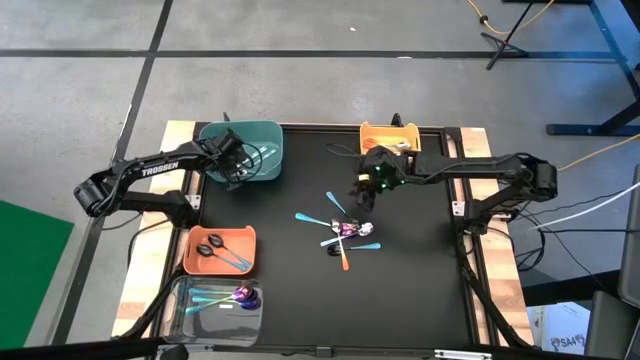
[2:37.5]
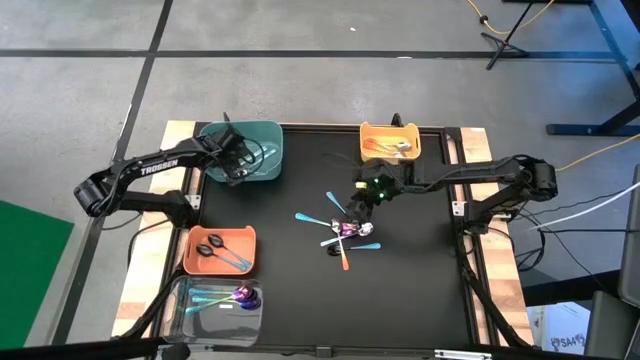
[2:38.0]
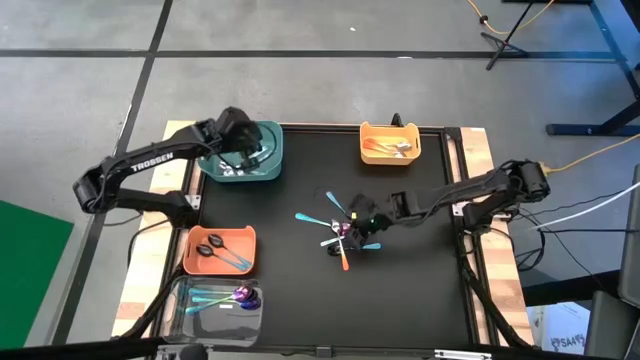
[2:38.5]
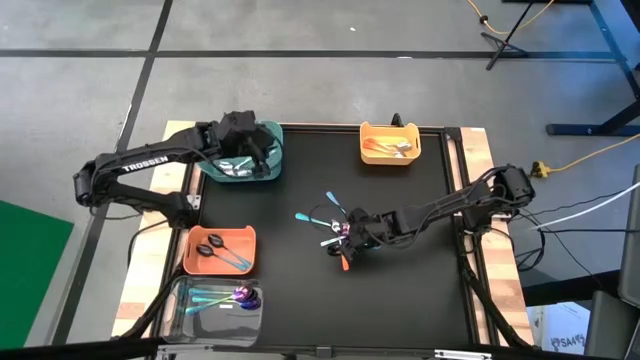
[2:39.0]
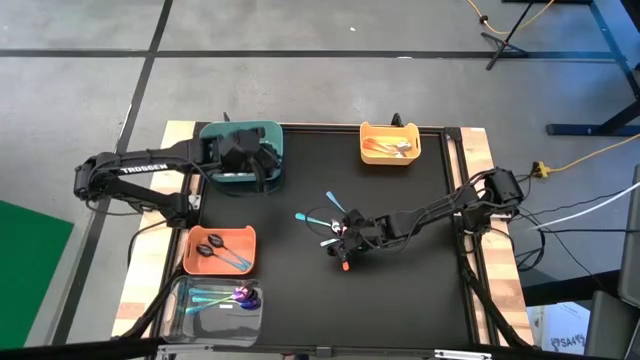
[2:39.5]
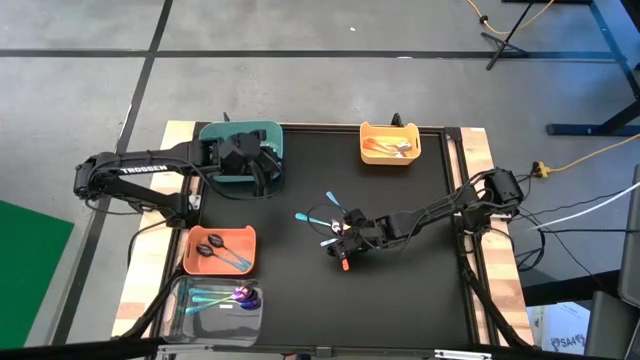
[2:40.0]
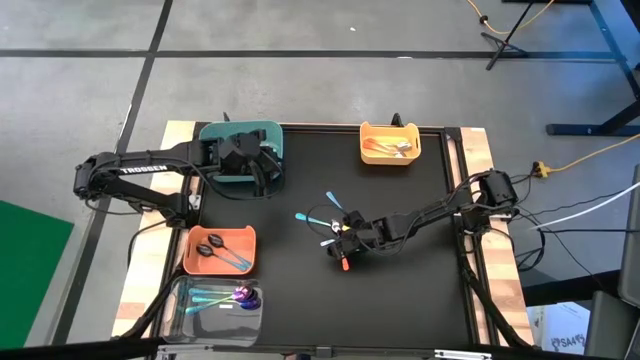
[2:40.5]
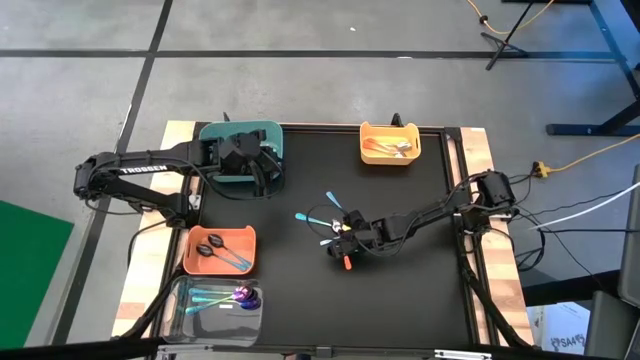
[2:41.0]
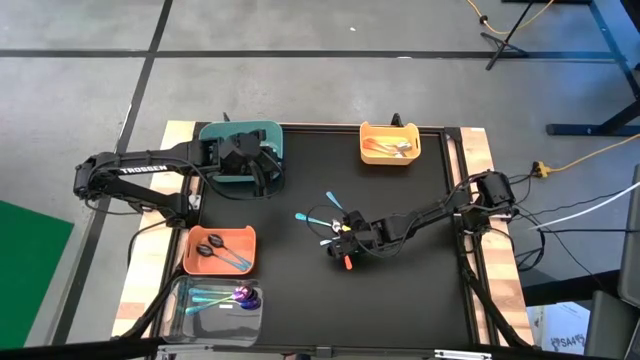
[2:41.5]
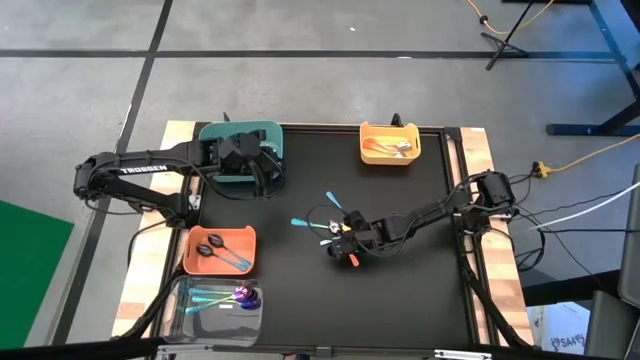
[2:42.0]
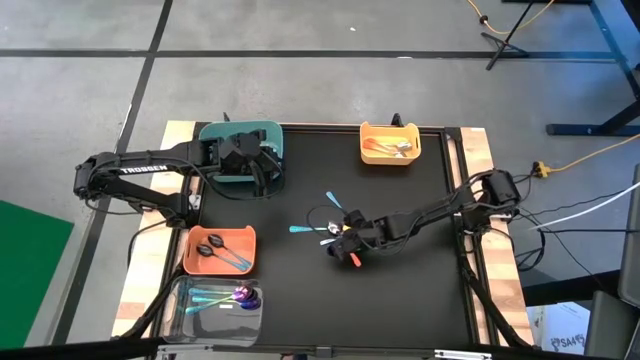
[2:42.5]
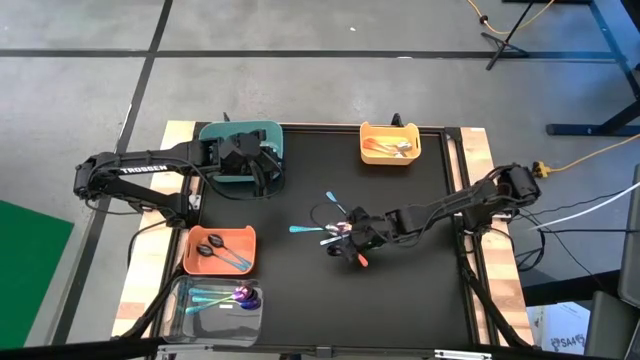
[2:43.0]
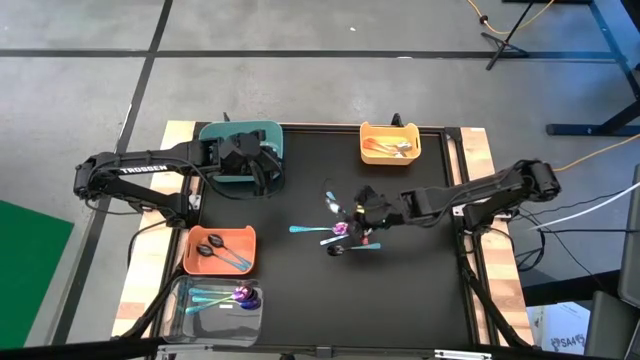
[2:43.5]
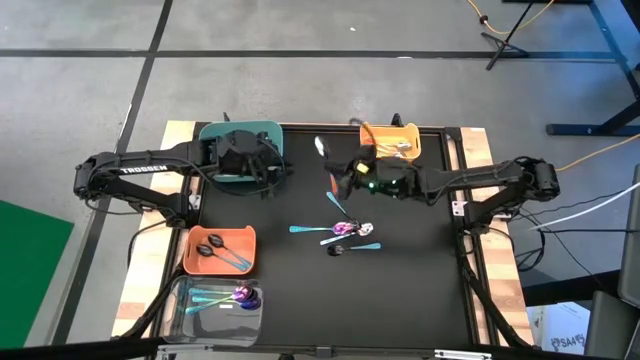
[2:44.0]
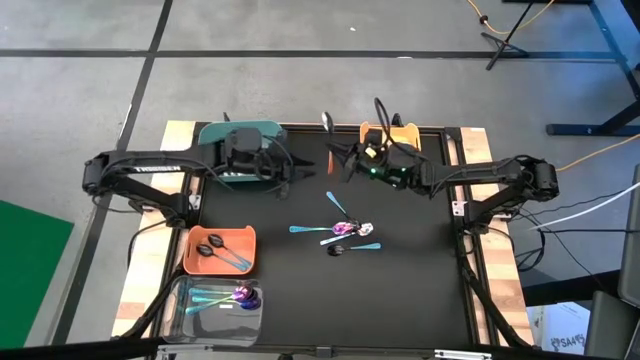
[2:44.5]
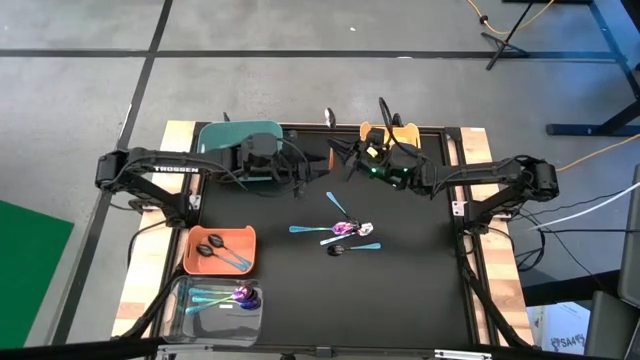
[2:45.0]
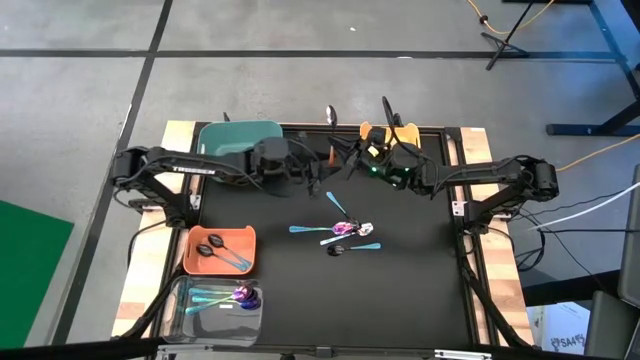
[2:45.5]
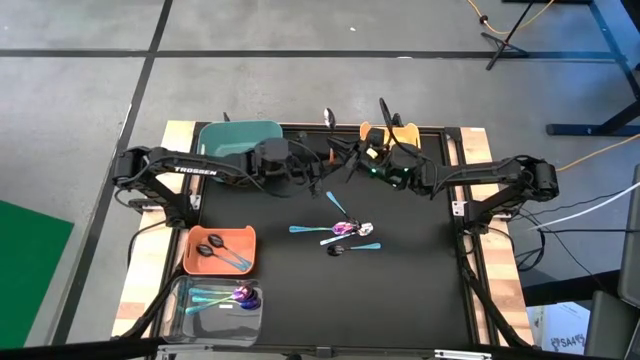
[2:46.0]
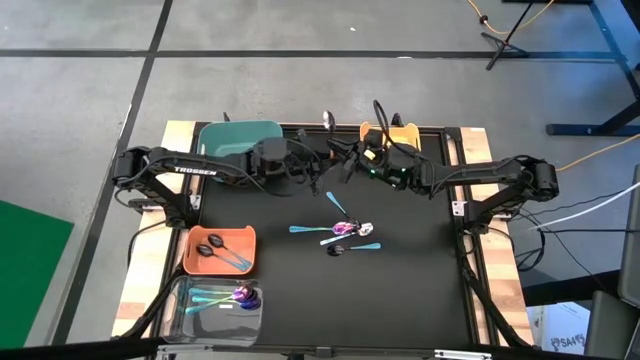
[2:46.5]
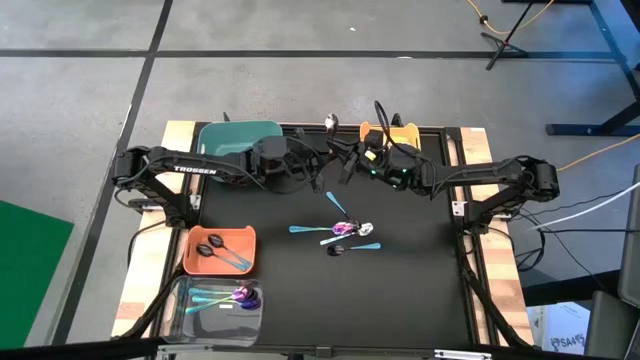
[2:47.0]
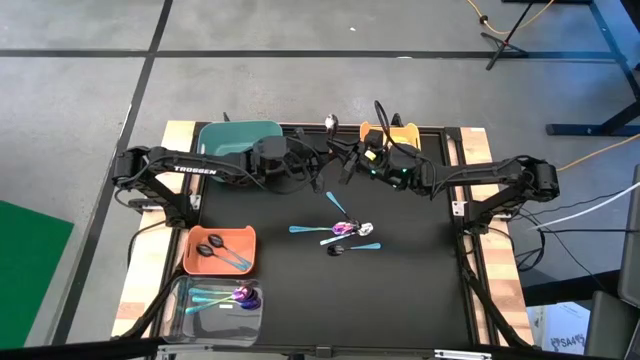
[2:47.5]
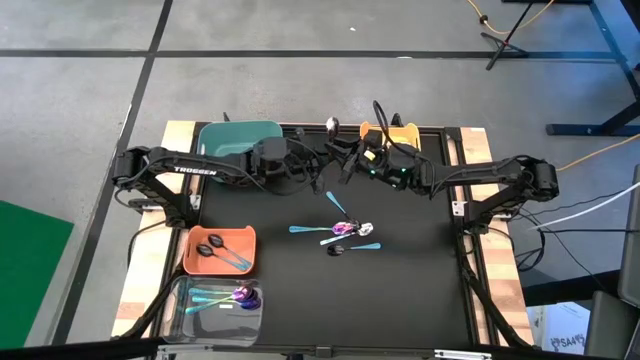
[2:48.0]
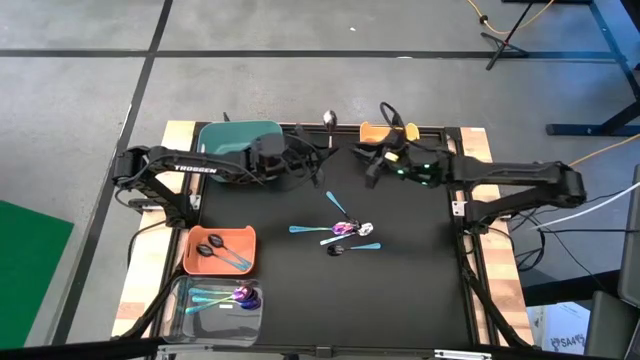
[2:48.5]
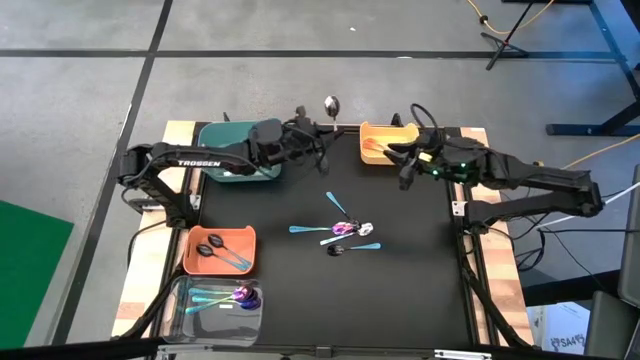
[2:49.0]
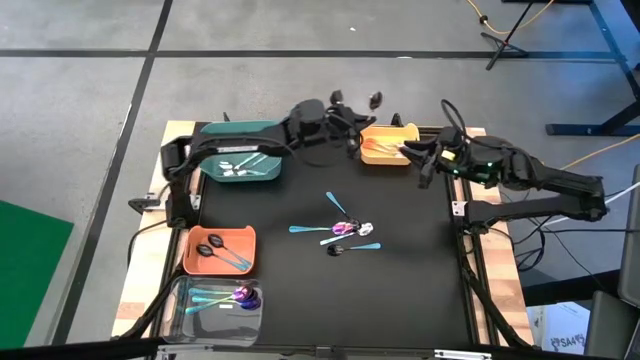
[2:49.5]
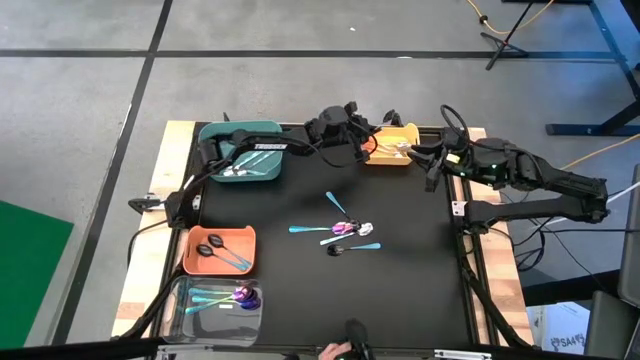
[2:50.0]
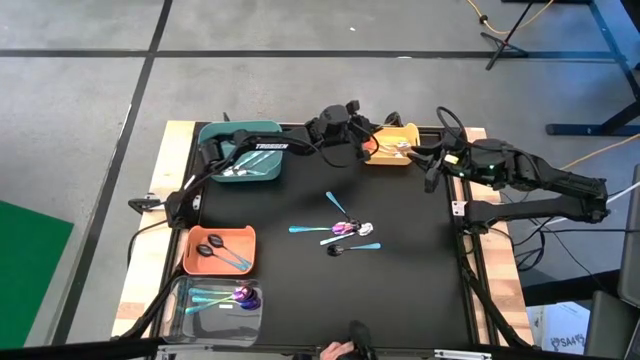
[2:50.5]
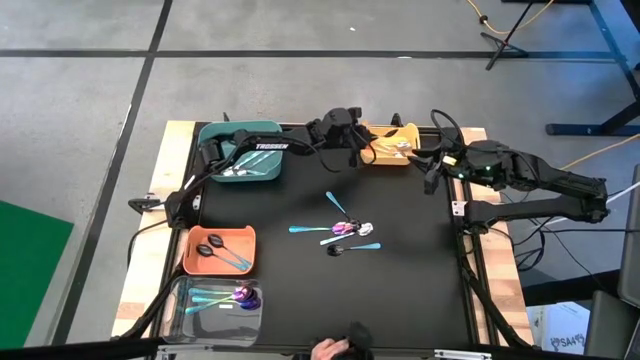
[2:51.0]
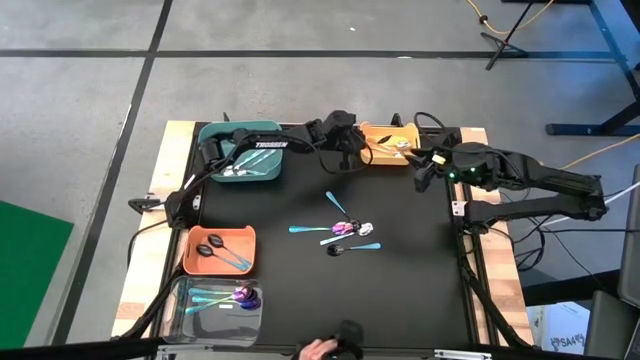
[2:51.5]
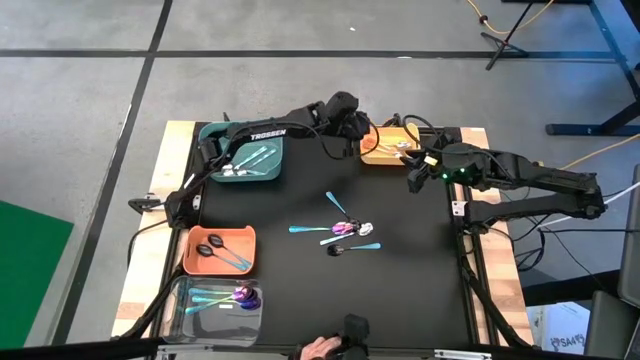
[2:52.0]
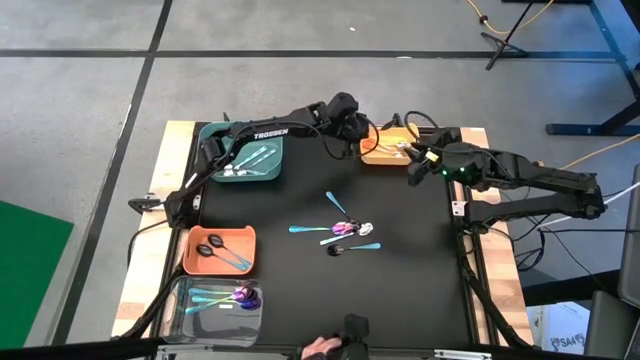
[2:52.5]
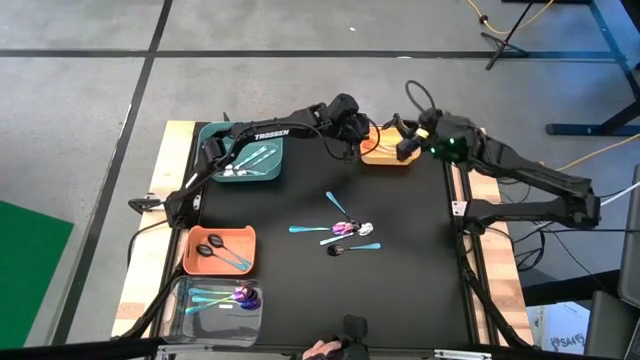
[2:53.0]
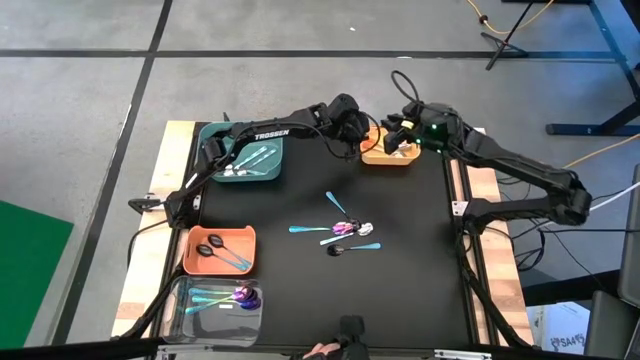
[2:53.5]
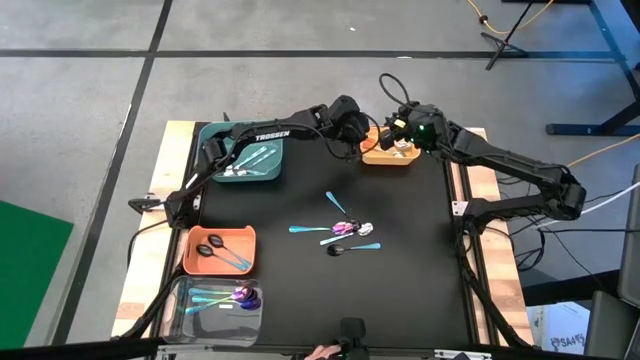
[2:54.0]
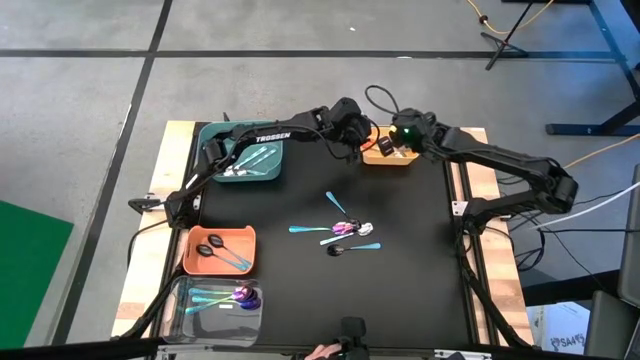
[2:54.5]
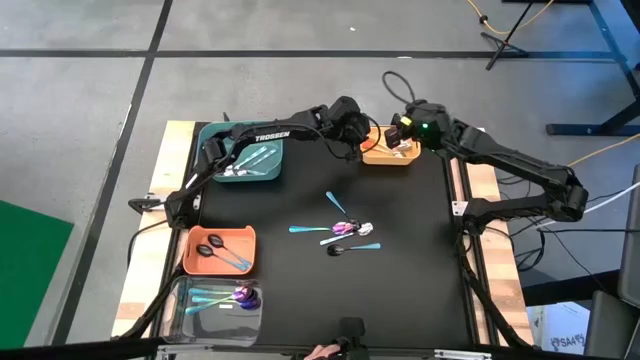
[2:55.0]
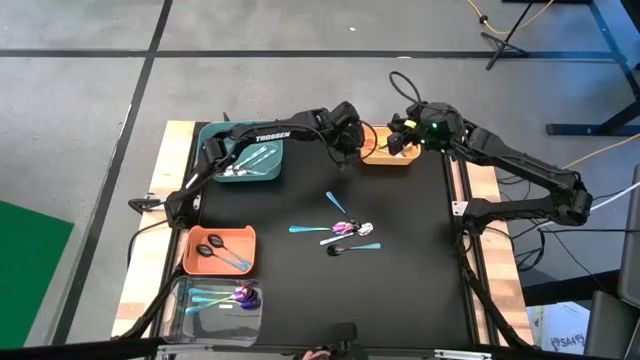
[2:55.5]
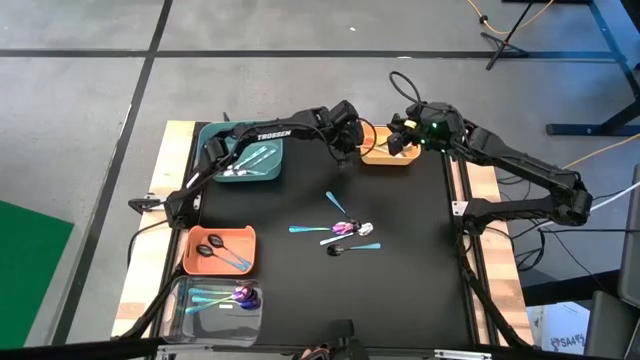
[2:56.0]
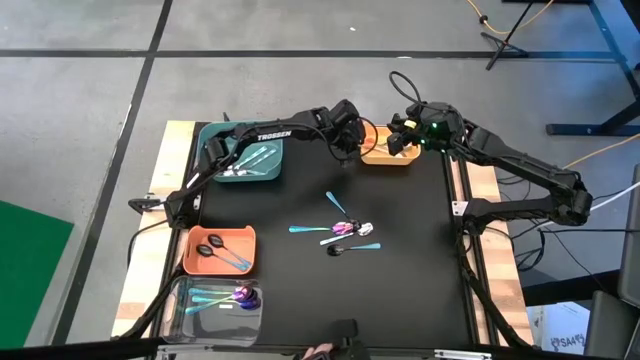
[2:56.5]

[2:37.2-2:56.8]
Task: Sort silverware by color (type)
Put the orange spoon into the yellow bin

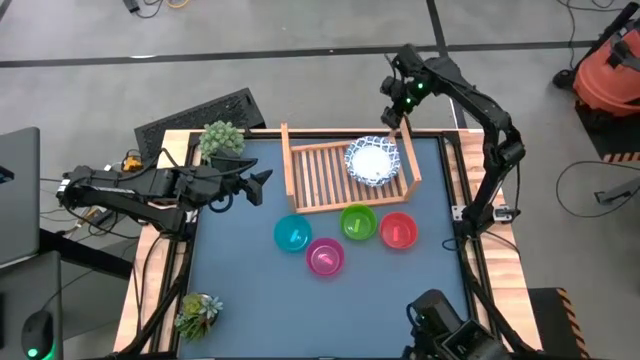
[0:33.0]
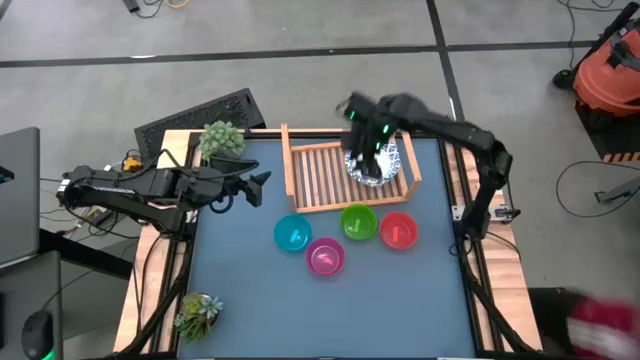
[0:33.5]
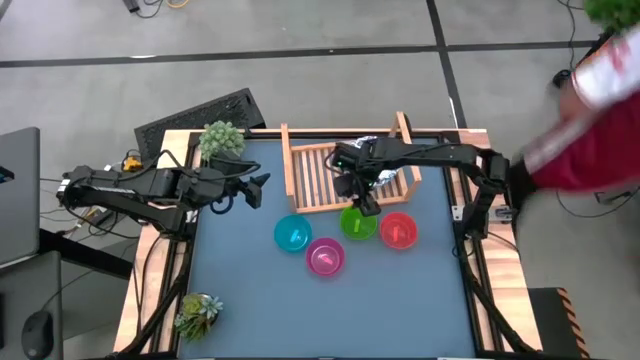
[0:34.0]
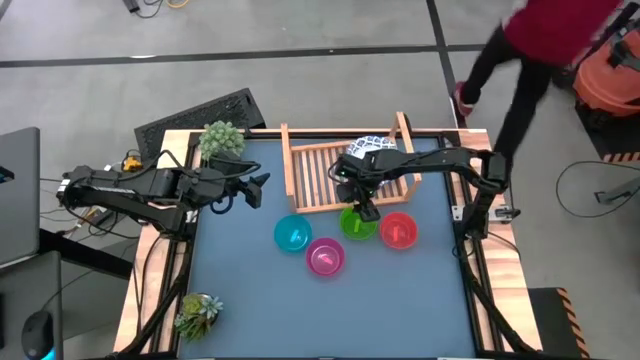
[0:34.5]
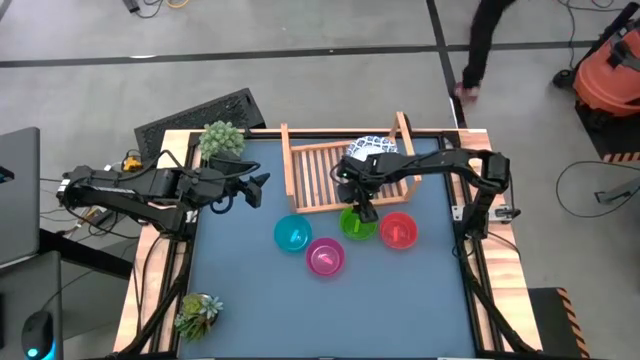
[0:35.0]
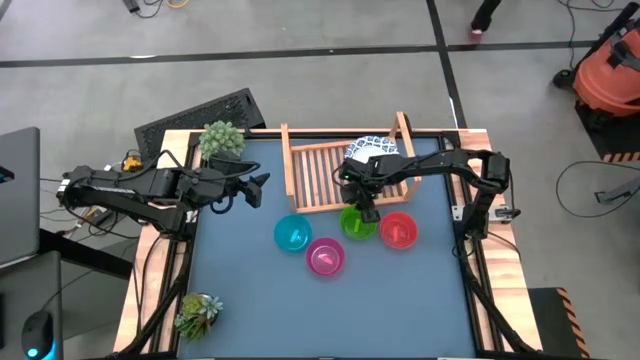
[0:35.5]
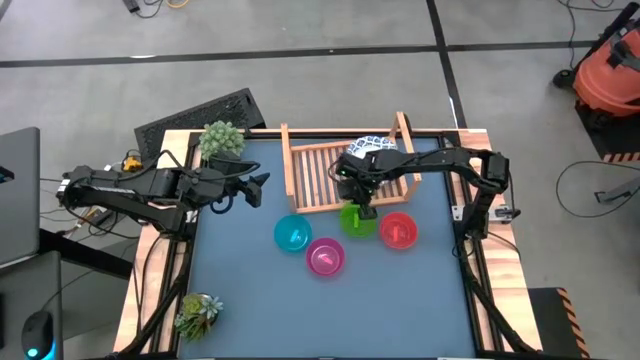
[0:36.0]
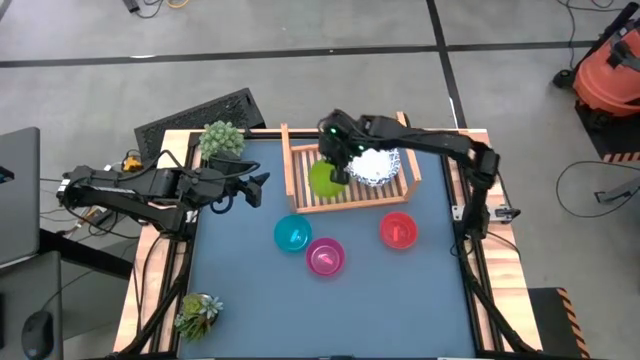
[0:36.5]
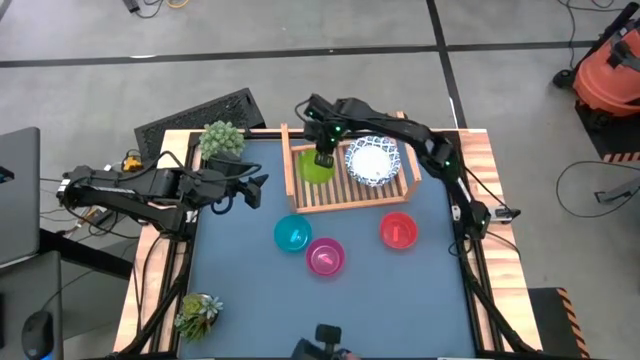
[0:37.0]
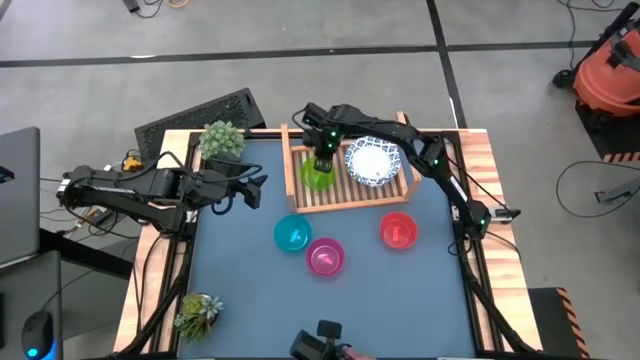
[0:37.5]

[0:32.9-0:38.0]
Task: Place and stack bowls onto a shelf
Put the green bowl on the shelf
